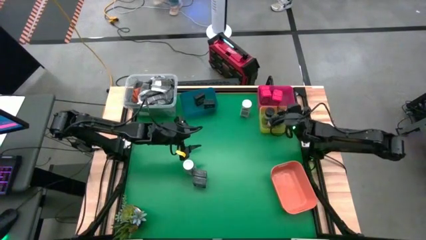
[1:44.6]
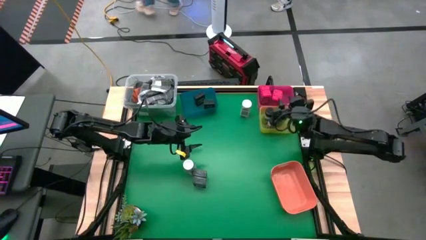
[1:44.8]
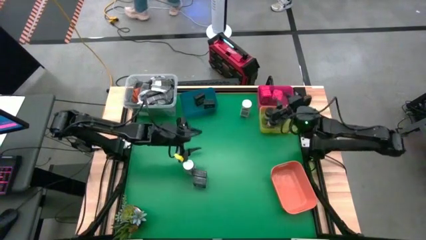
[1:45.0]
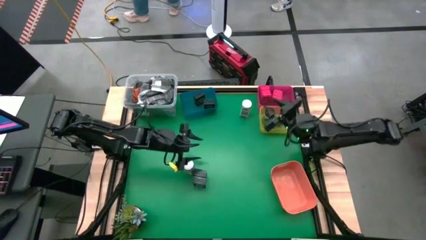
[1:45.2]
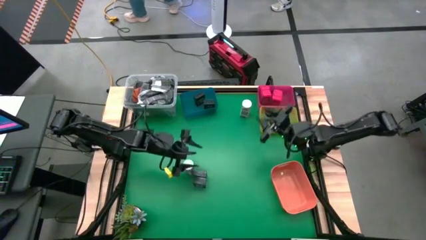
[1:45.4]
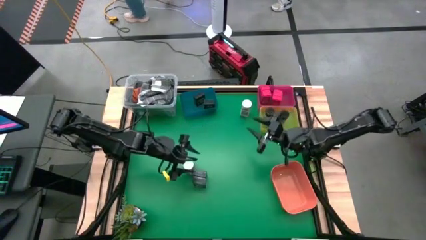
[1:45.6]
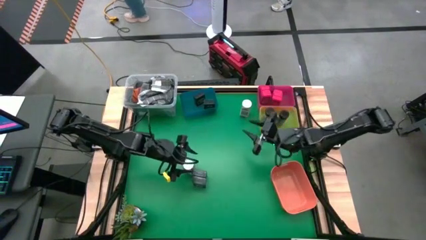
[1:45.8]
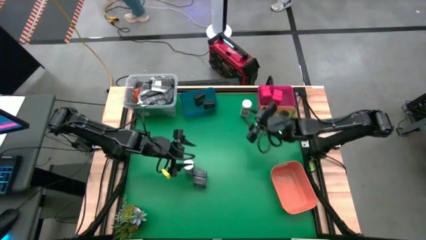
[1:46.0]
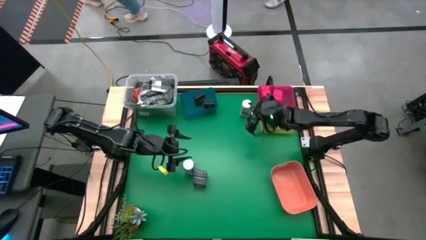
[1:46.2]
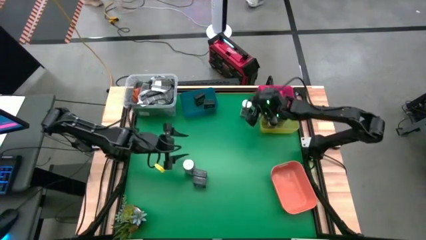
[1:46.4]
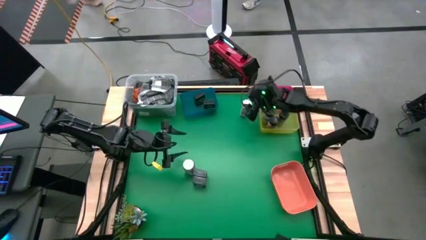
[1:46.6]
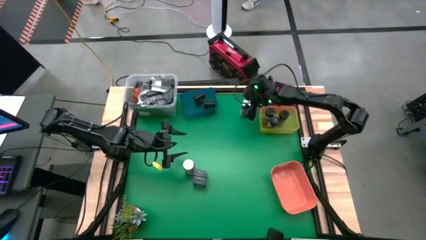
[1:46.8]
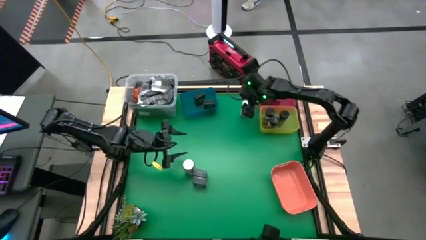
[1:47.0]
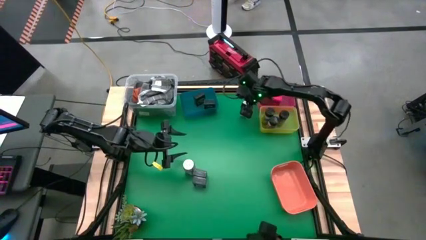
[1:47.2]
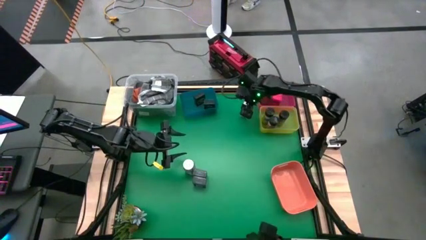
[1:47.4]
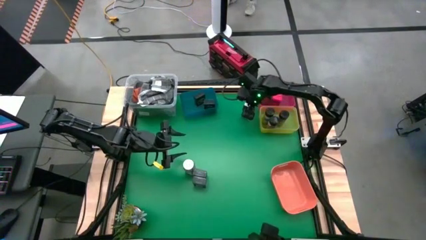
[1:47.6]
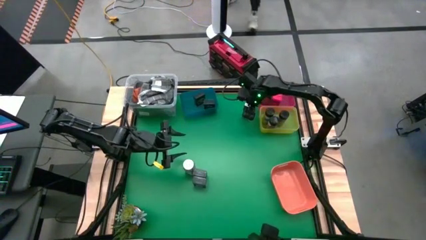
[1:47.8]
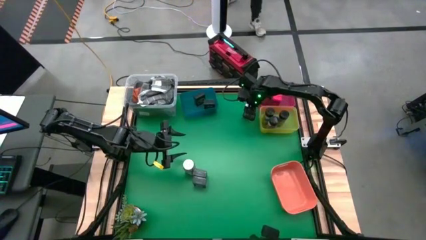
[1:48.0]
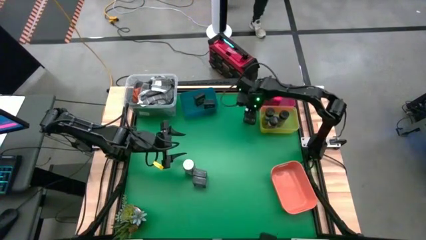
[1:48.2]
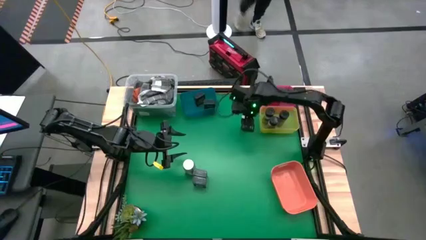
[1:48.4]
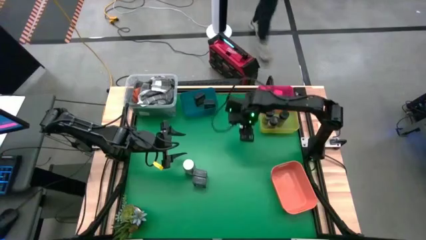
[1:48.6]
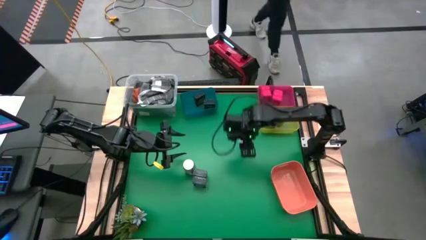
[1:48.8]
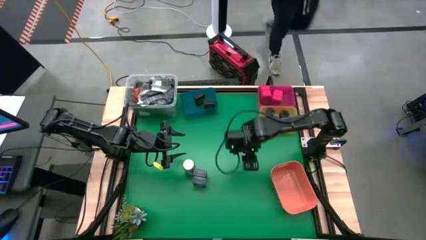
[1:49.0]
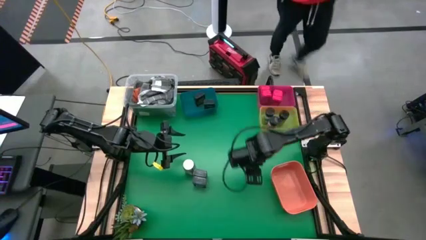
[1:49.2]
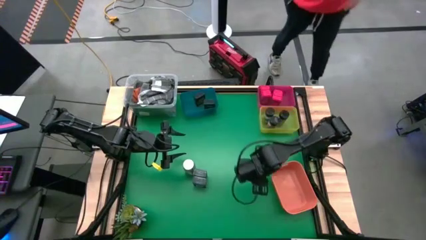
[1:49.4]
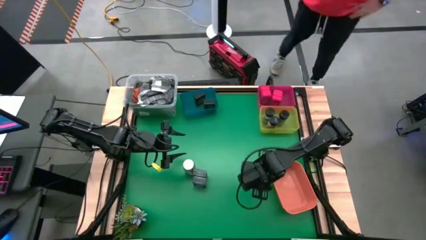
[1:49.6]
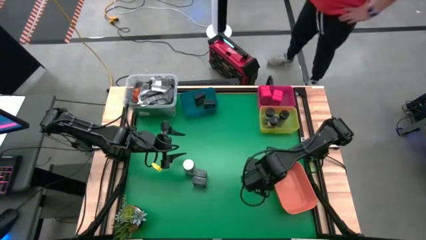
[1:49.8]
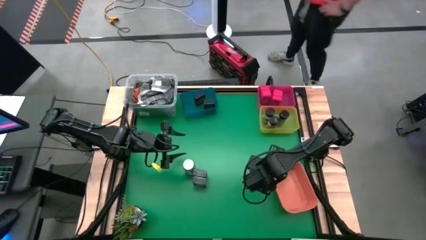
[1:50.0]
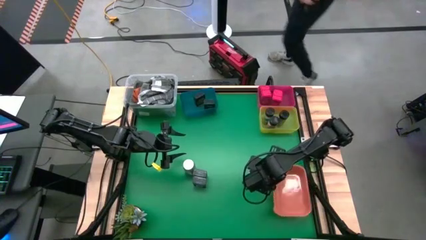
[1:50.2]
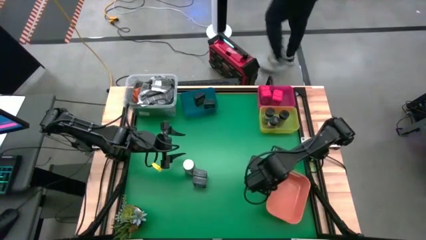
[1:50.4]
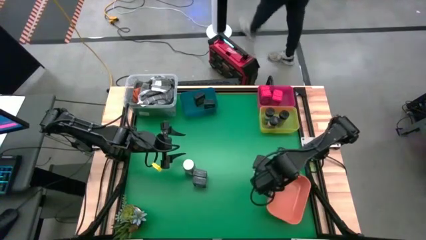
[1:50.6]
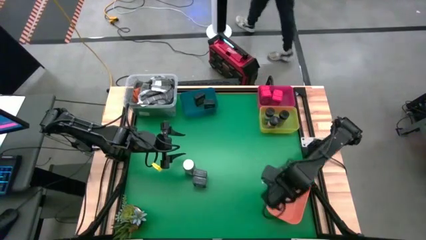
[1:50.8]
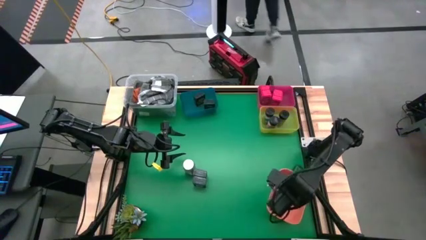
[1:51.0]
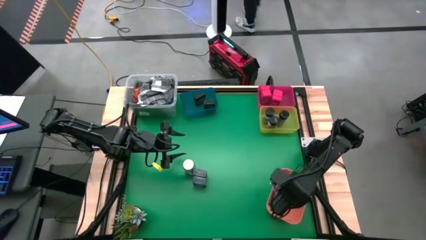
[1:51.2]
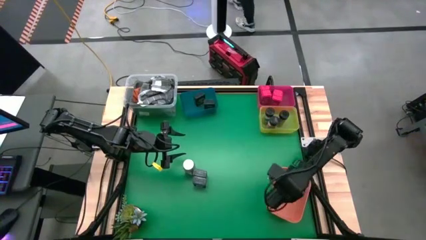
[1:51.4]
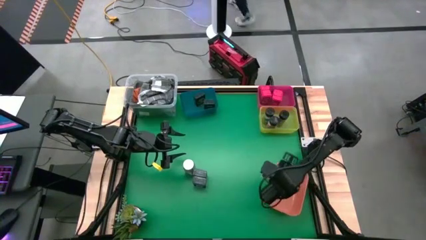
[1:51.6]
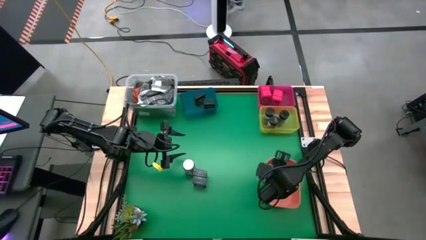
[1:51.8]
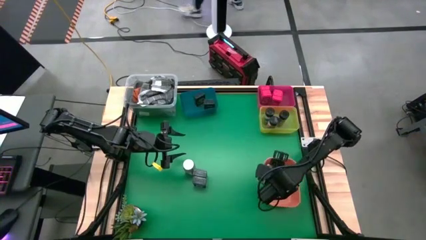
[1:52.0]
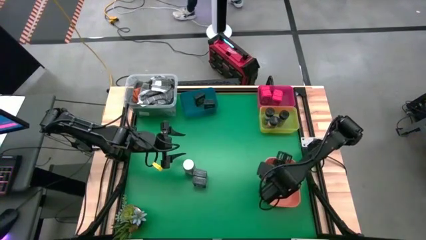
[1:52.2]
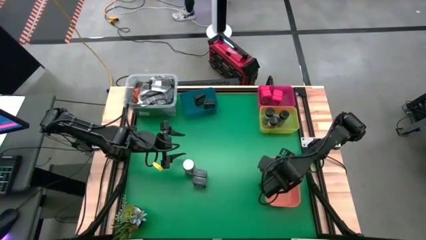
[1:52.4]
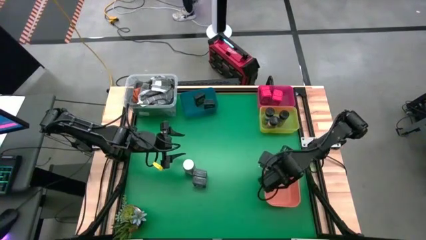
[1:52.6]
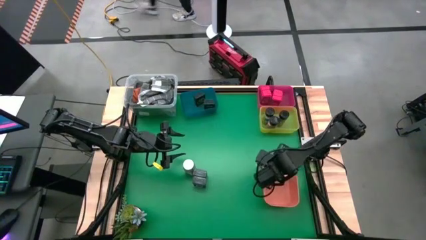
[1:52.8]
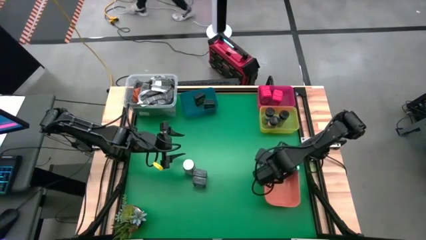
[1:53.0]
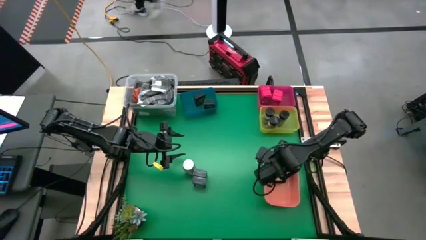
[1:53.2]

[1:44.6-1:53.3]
Task: Sort spices by type
Put the white seasoning from the top right into the orange bin

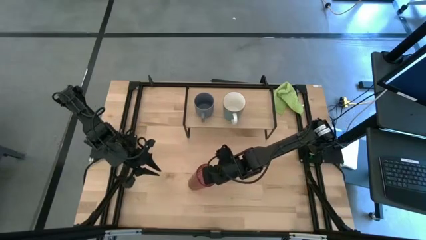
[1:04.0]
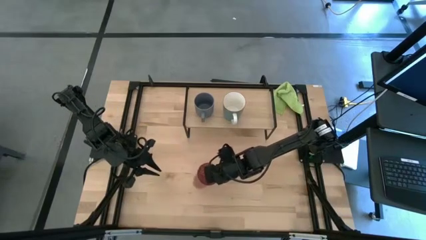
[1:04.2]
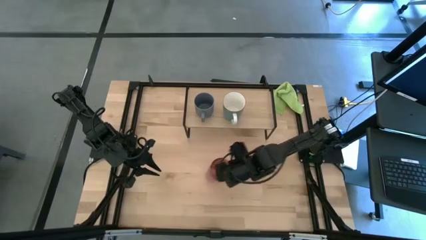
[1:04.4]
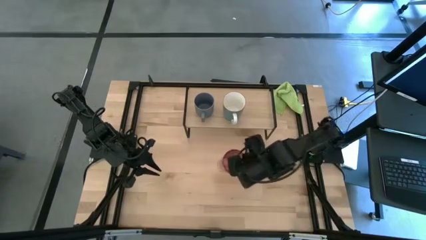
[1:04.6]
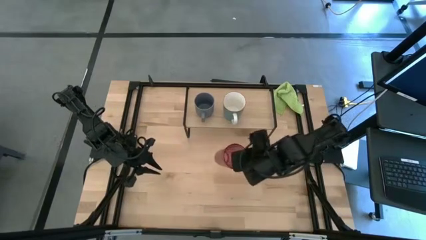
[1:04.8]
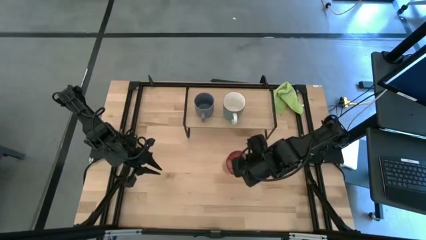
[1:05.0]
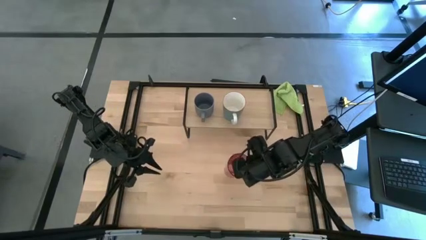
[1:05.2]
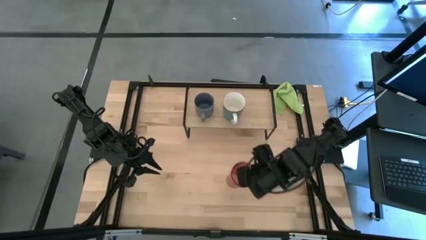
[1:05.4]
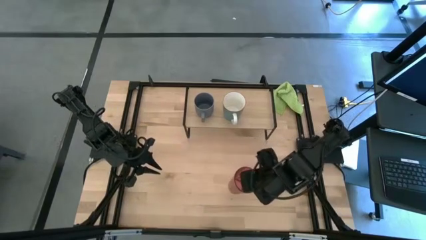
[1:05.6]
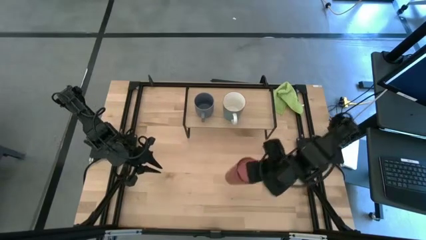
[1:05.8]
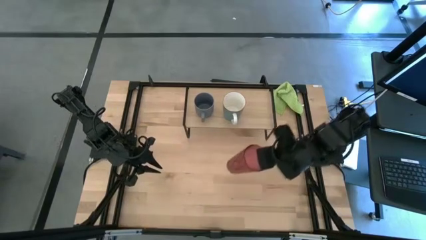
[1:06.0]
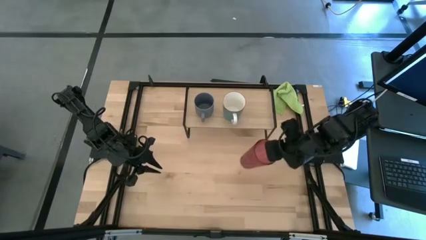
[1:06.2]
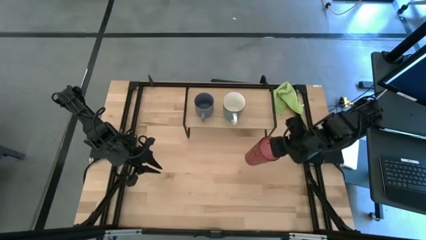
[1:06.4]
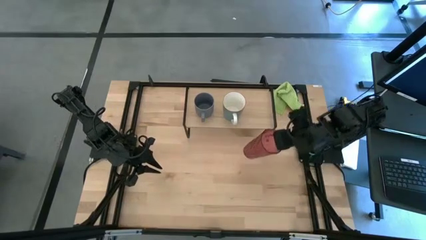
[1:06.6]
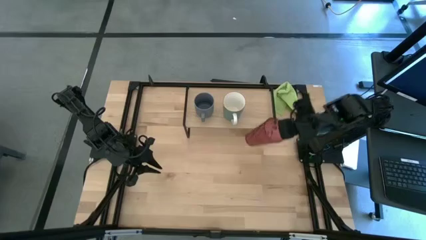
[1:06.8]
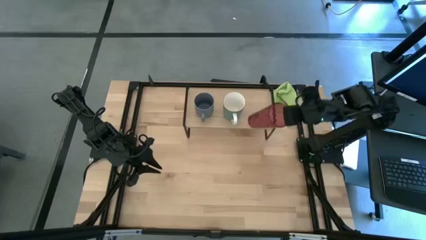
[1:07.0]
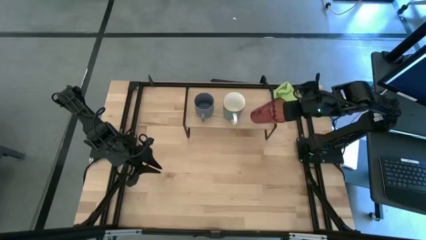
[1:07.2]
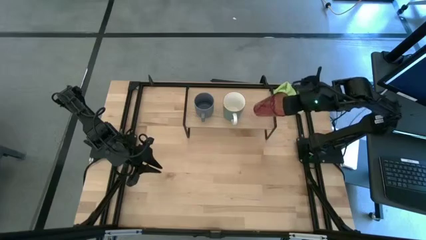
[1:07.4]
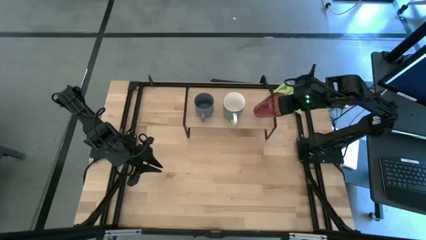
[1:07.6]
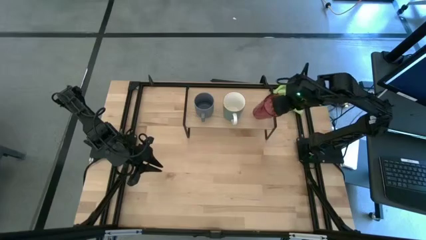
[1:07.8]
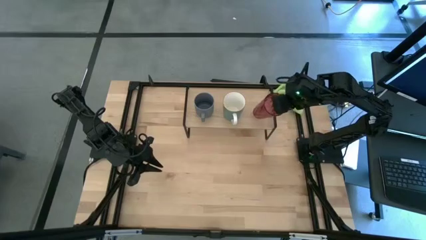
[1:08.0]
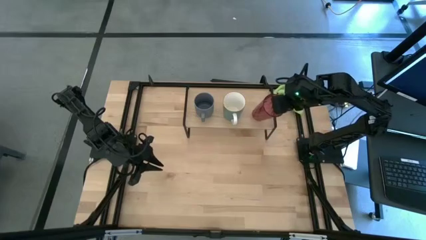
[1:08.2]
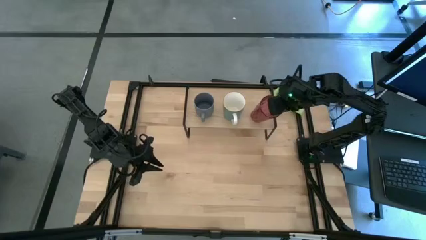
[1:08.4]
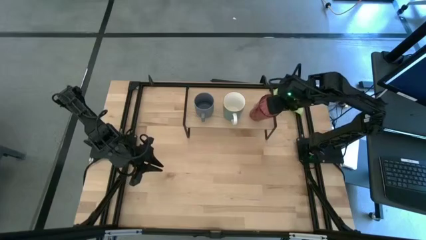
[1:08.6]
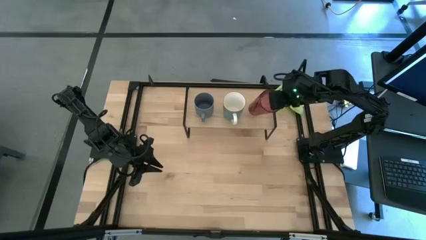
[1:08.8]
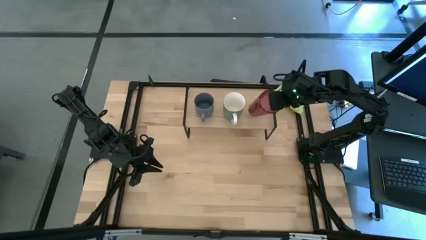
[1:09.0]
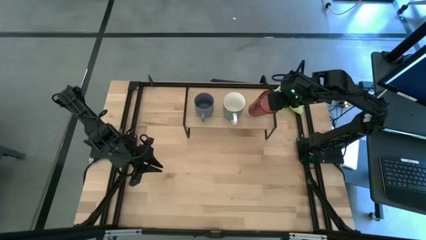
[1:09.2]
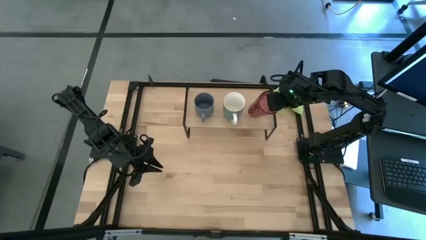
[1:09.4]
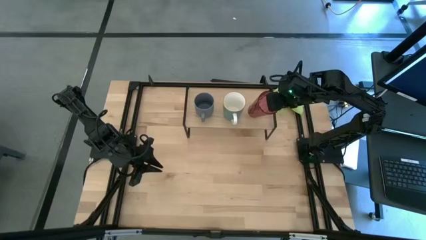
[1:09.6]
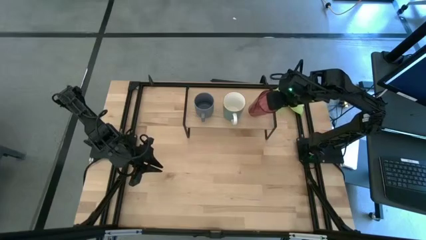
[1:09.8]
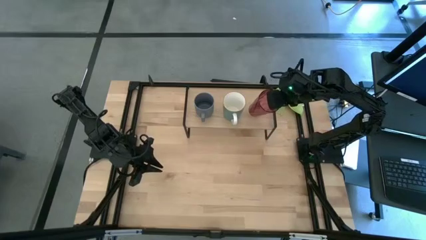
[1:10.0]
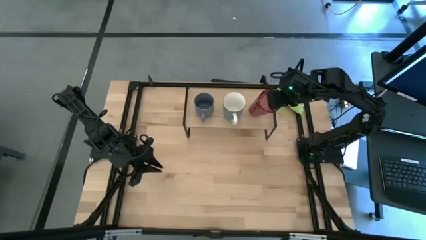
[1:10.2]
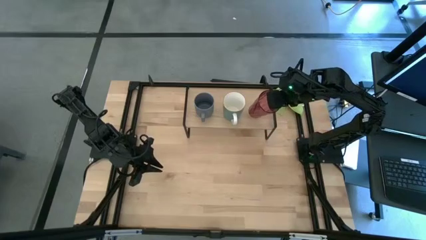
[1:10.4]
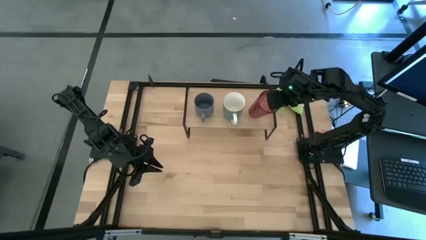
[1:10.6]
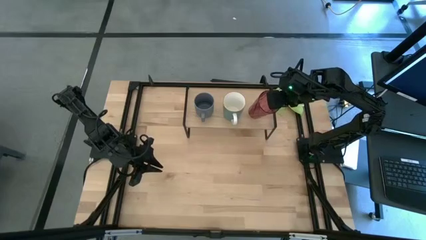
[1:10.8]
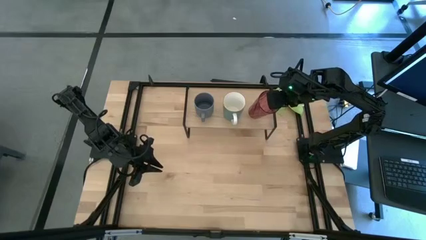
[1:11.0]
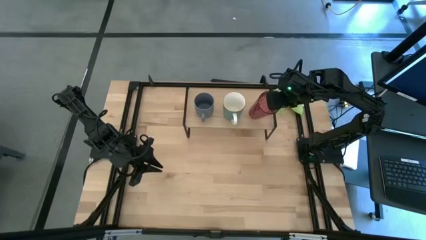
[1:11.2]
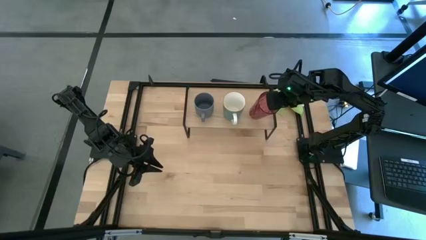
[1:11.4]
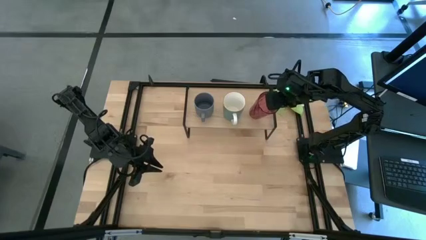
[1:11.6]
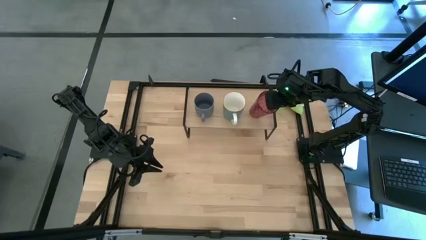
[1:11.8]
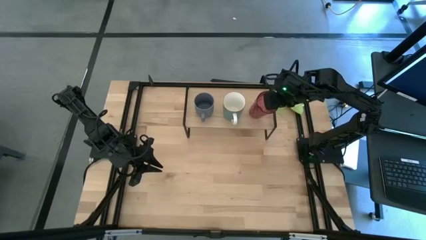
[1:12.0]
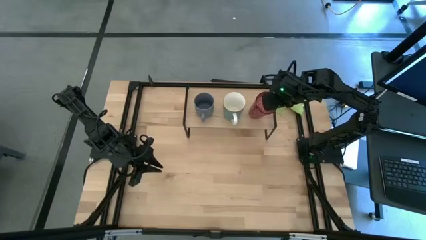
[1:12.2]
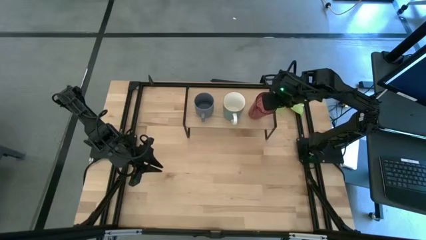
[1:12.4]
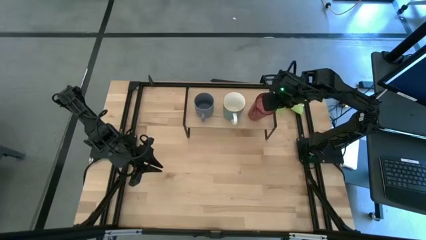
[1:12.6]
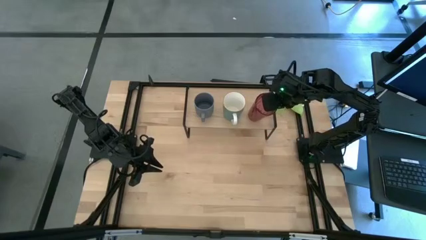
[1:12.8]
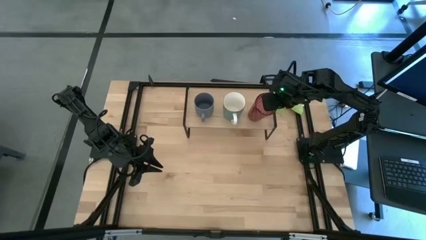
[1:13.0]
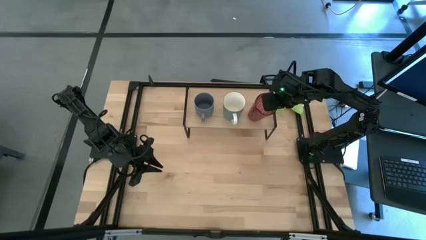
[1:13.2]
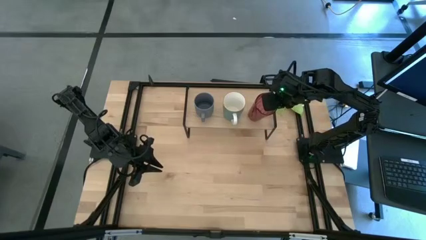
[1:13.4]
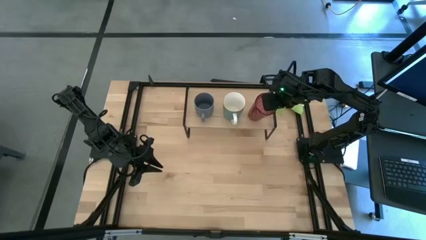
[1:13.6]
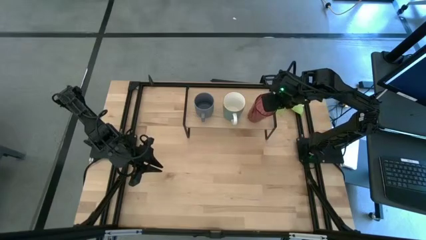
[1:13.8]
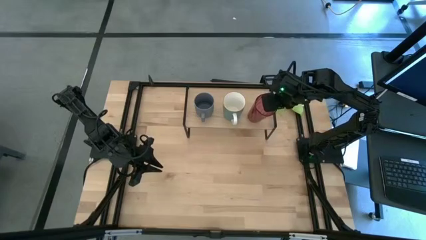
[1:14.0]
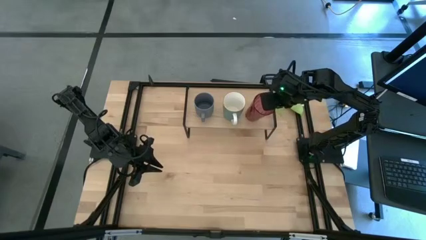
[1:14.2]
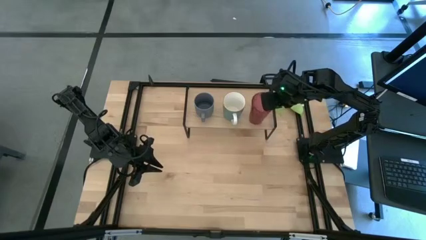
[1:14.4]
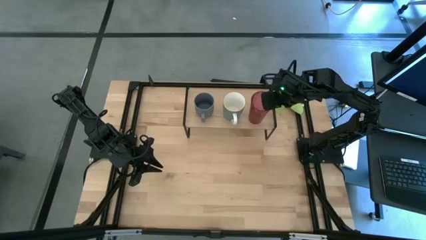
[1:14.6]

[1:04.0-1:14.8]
Task: Stack small to large cups/mugs on shelf
Put the purple cup on the shelf
